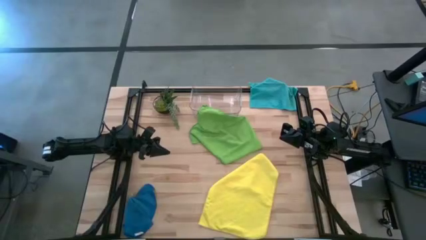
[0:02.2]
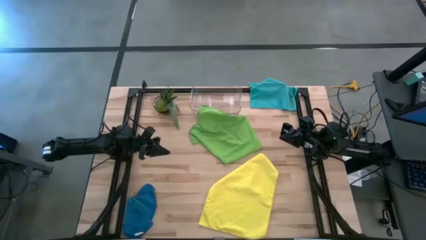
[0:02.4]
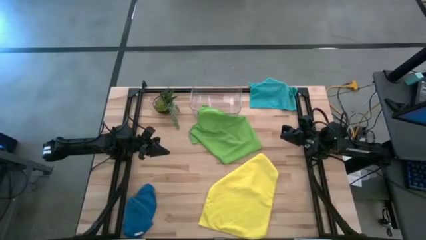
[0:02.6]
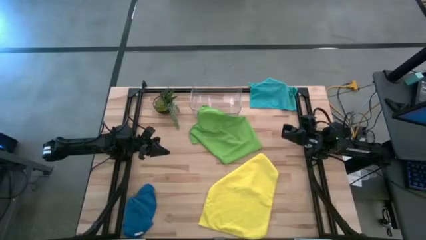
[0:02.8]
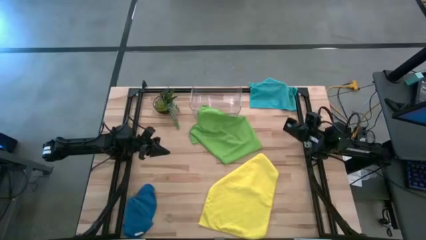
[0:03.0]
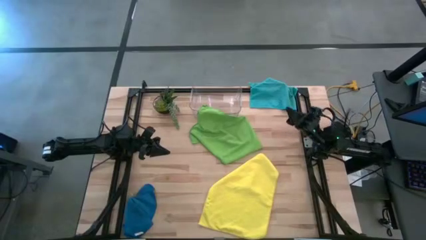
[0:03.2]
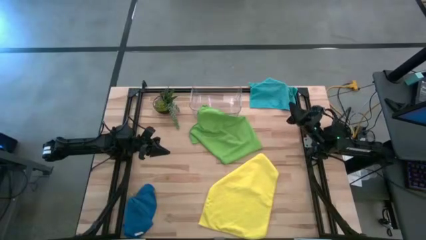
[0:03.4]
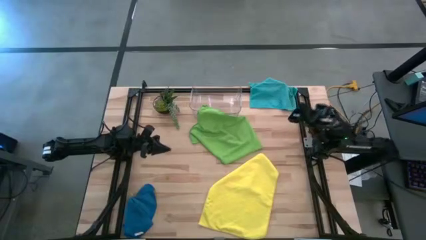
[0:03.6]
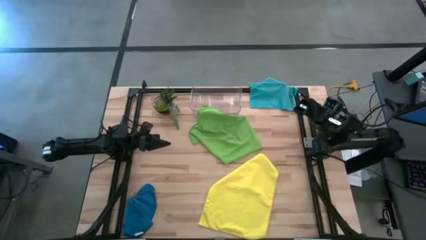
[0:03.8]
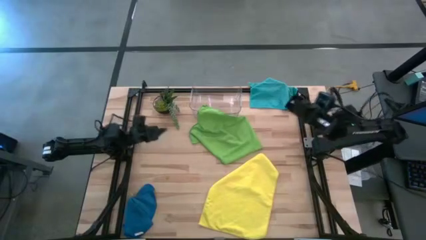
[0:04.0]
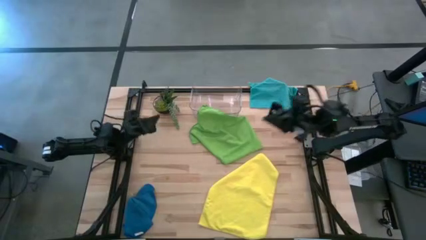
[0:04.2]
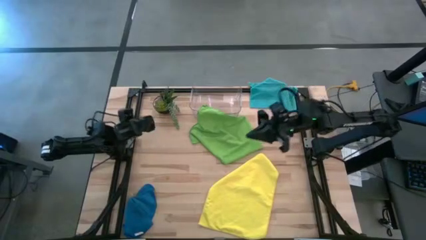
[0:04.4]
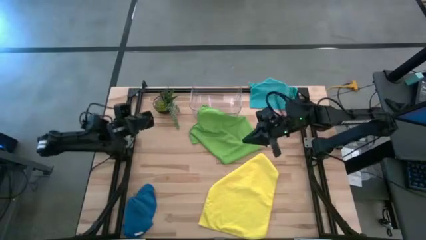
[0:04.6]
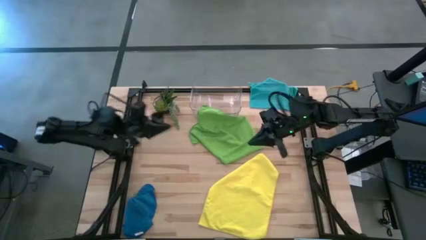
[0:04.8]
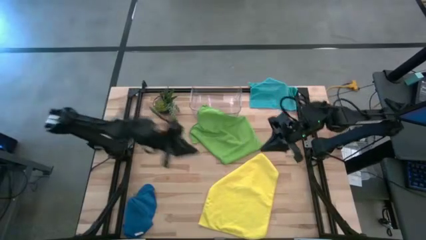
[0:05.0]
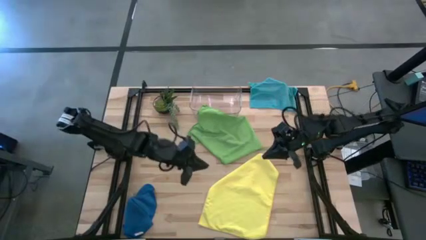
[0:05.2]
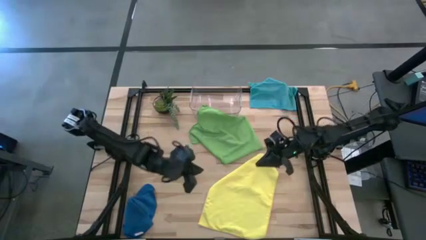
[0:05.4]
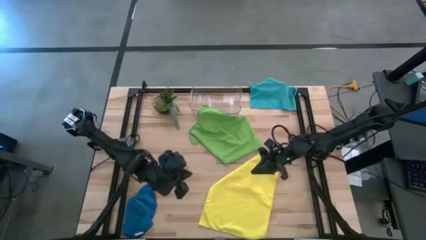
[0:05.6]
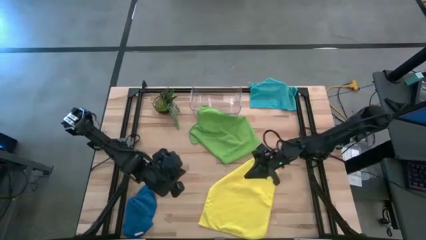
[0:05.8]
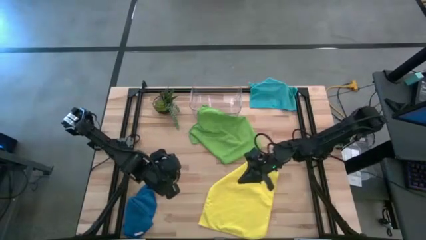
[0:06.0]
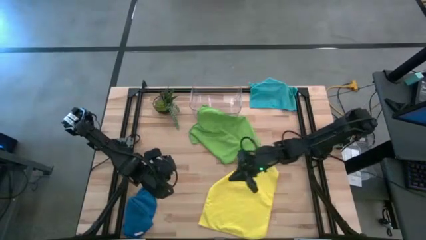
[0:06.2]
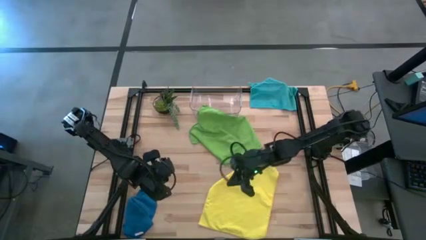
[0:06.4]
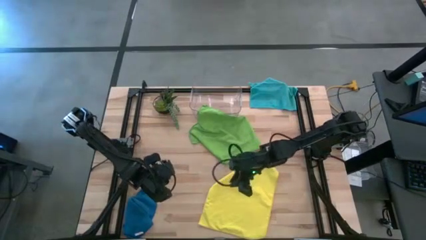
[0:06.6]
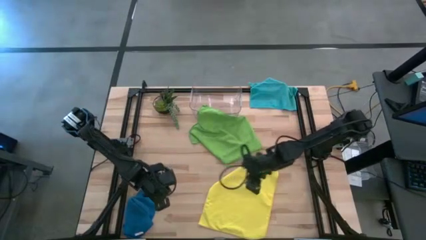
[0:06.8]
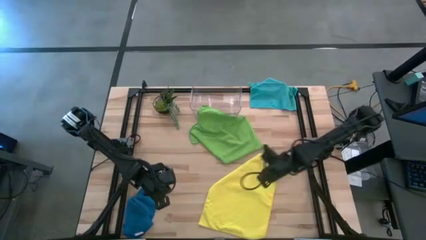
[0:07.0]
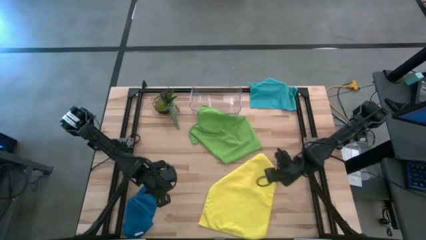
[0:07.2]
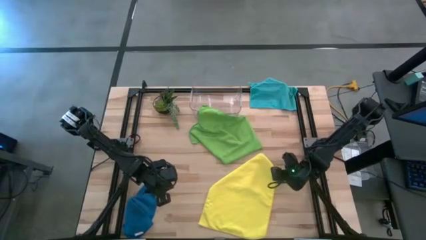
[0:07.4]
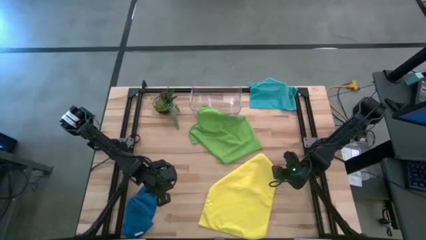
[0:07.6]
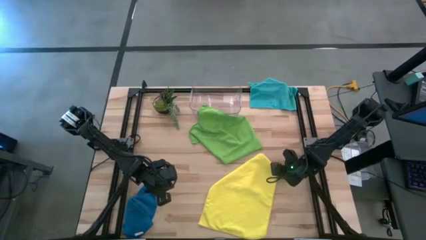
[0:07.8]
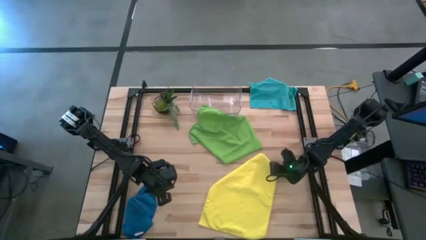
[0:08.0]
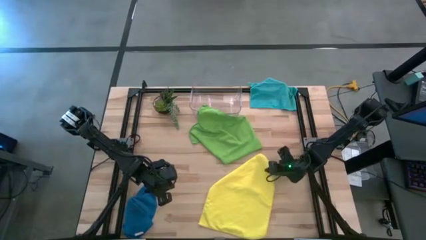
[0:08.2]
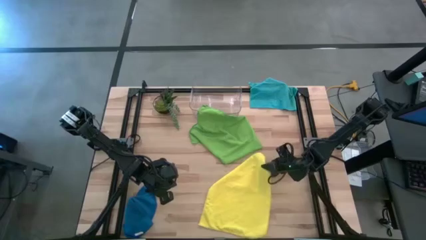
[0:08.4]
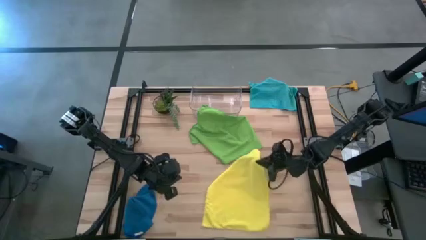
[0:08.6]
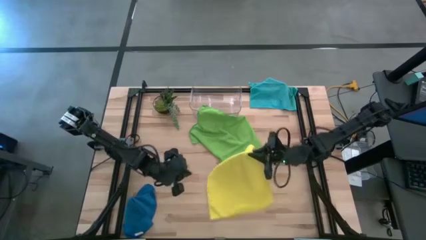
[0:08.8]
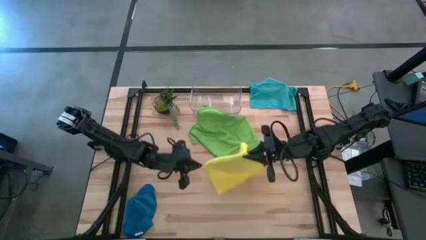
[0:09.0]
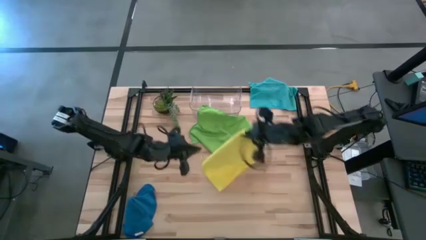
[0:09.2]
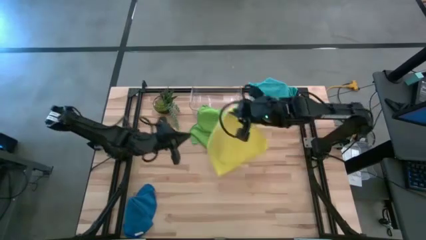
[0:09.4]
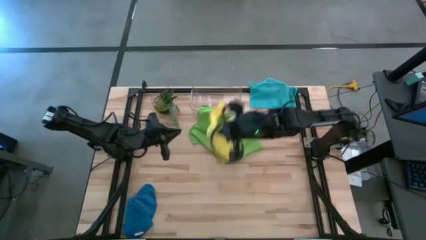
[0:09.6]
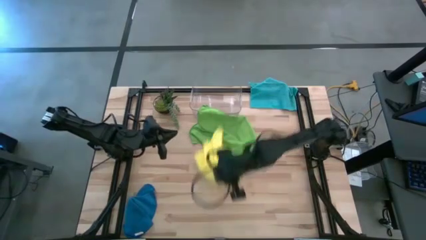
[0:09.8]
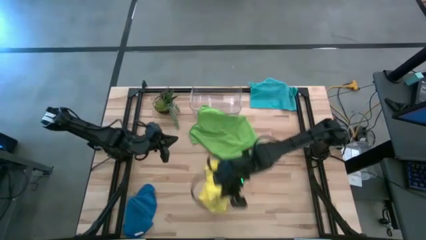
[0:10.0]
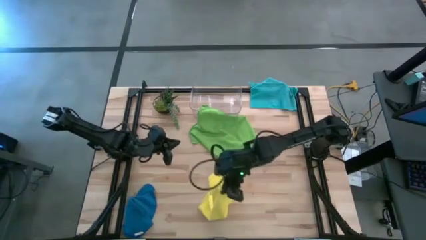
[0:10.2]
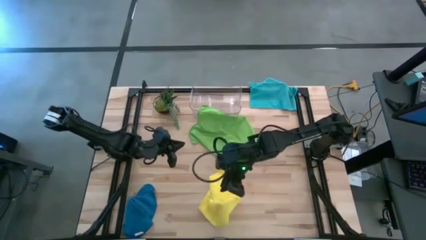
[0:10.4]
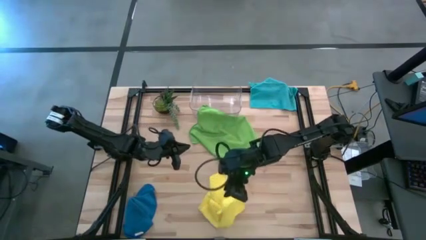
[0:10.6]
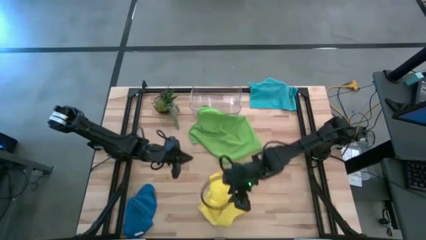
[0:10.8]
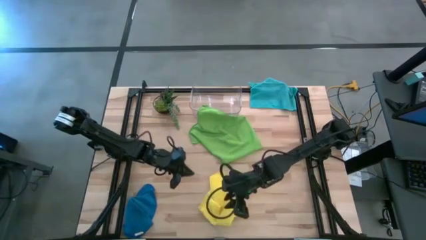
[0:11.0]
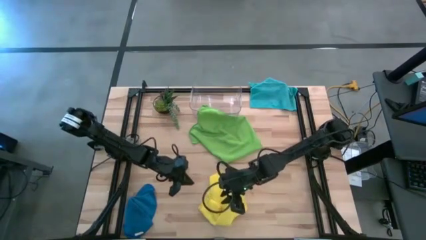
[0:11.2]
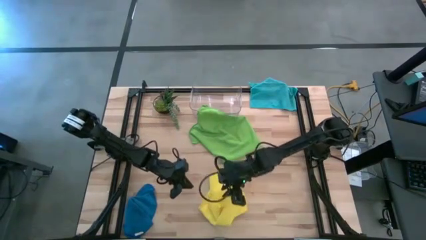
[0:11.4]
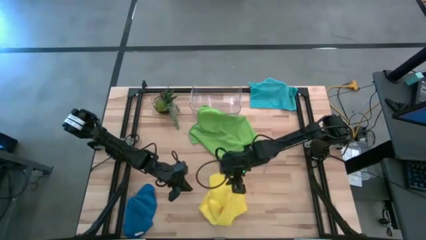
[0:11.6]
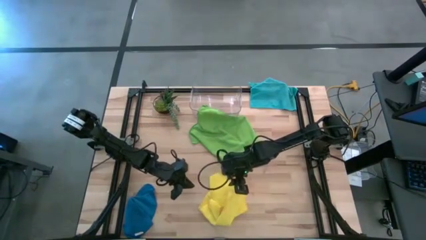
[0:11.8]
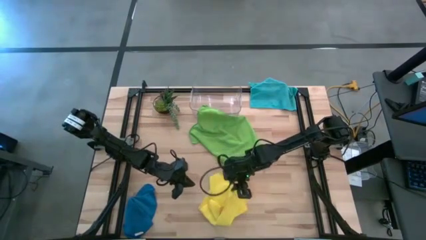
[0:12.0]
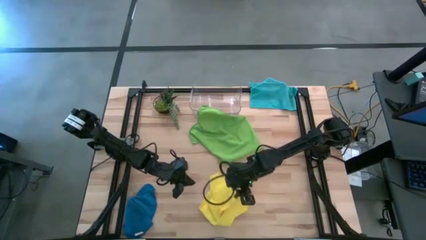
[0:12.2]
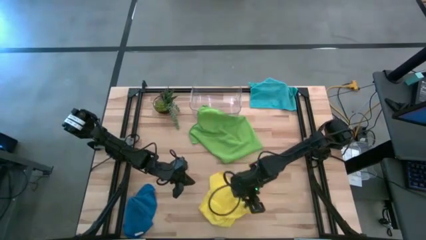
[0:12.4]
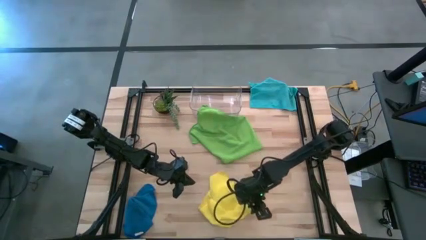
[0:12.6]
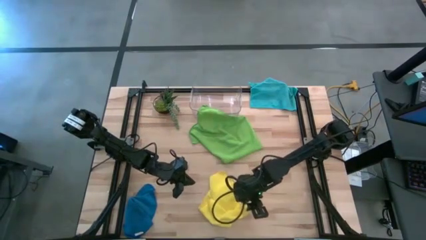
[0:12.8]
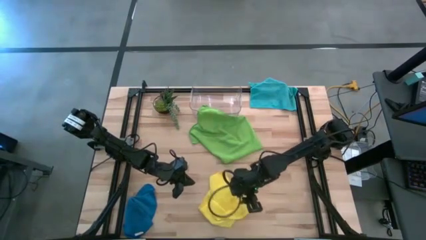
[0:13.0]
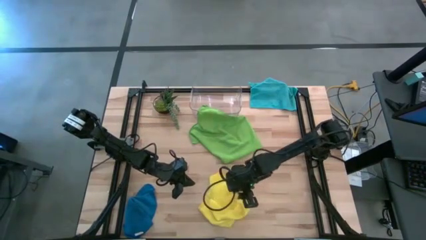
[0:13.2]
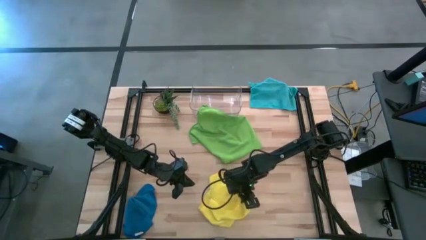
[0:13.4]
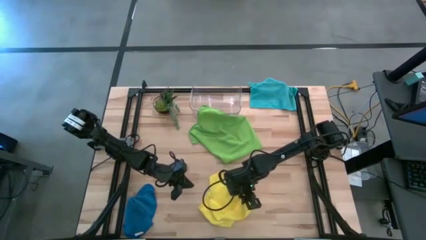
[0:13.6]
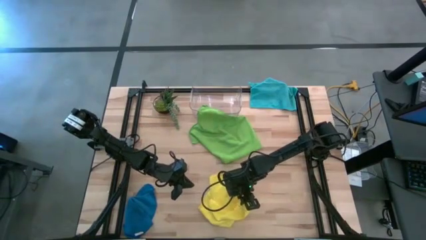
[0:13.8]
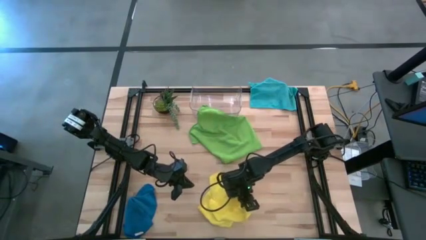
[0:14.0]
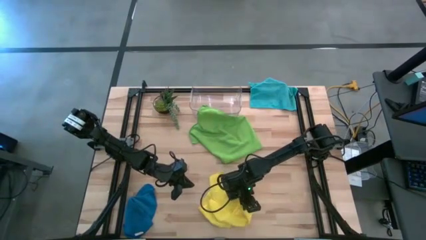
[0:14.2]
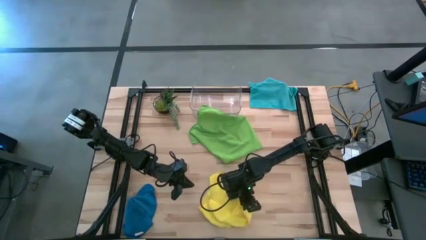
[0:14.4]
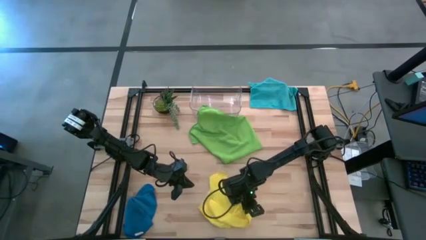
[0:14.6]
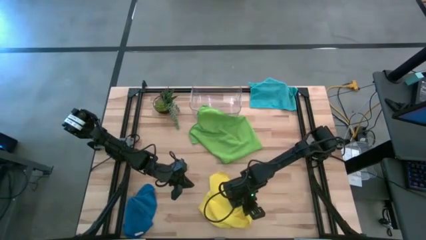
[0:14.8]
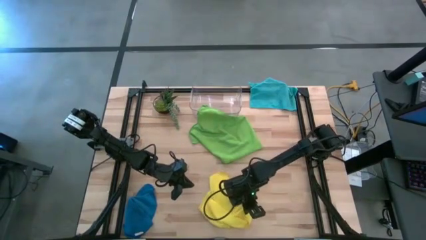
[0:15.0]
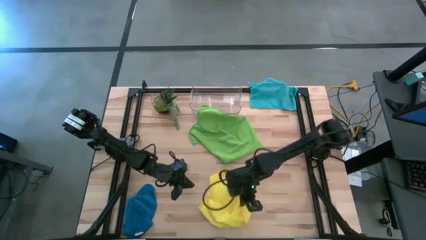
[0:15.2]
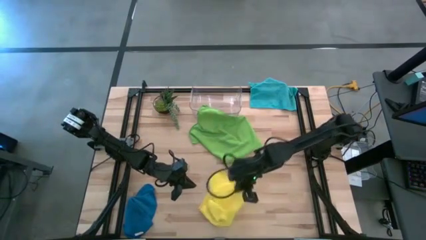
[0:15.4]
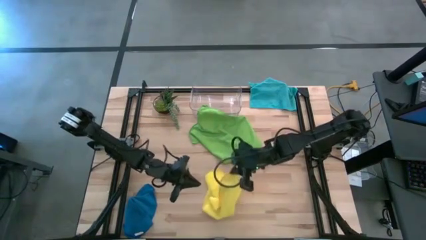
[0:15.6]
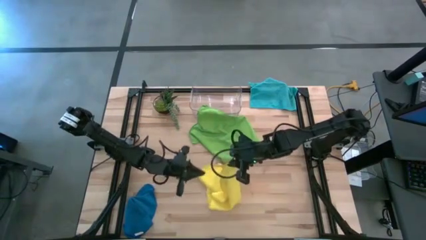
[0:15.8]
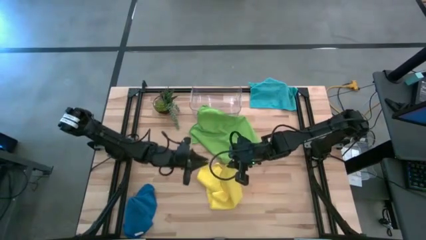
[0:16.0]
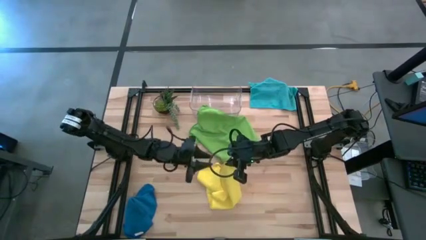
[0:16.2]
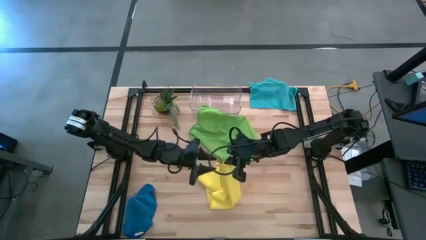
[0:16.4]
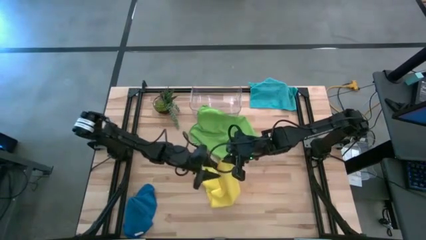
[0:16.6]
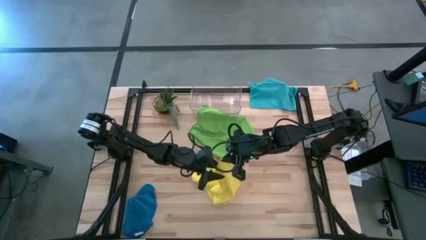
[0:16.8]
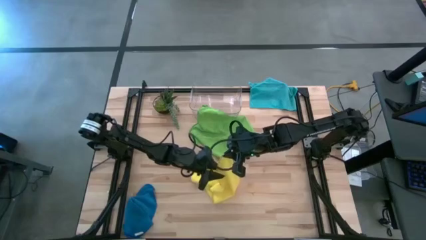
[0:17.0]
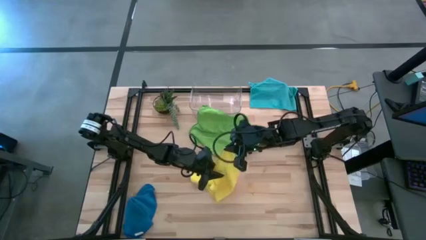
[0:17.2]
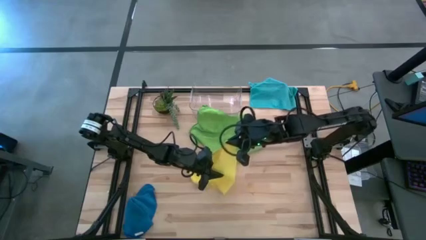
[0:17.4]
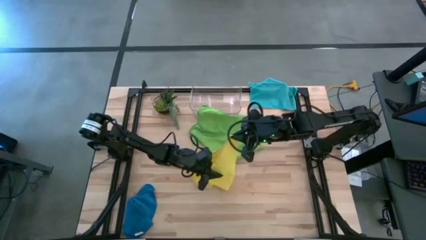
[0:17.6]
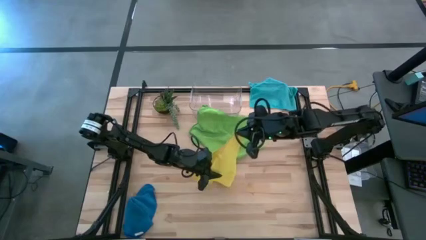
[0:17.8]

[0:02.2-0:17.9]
Task: Fold microfiber towels
Fold the yellow towel
